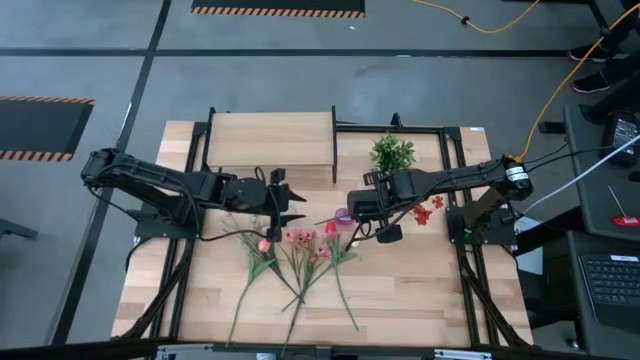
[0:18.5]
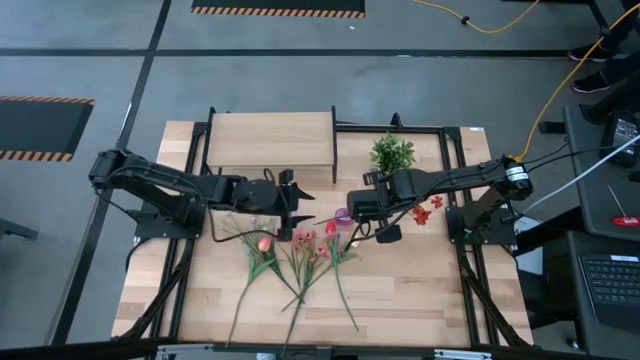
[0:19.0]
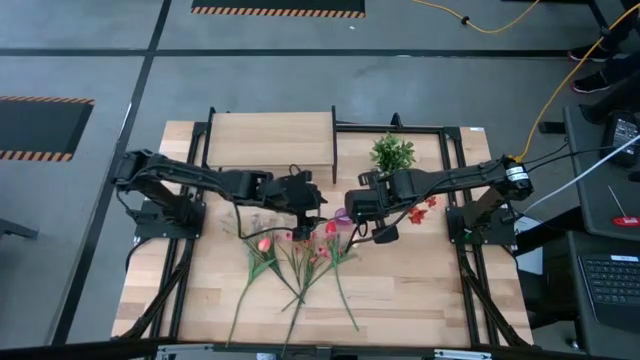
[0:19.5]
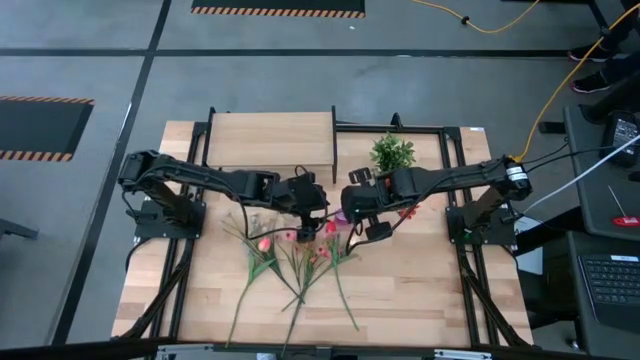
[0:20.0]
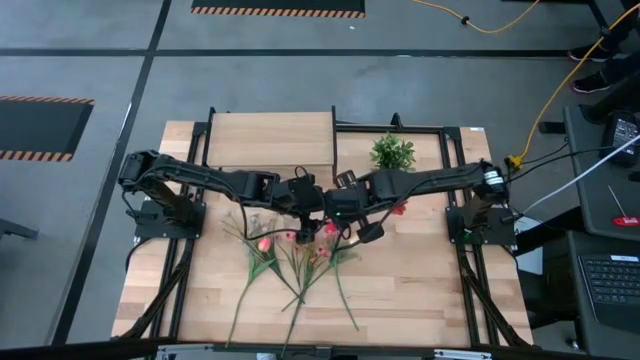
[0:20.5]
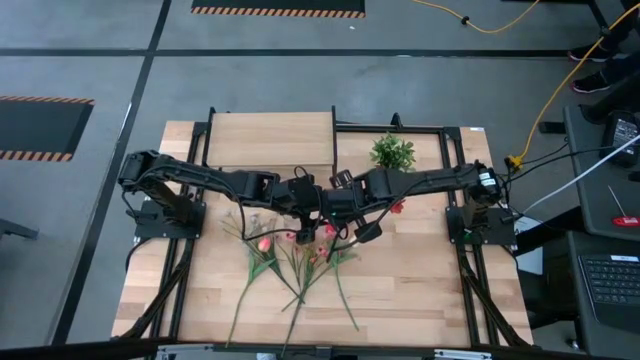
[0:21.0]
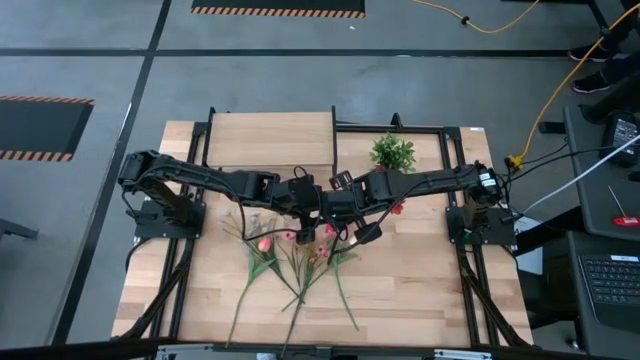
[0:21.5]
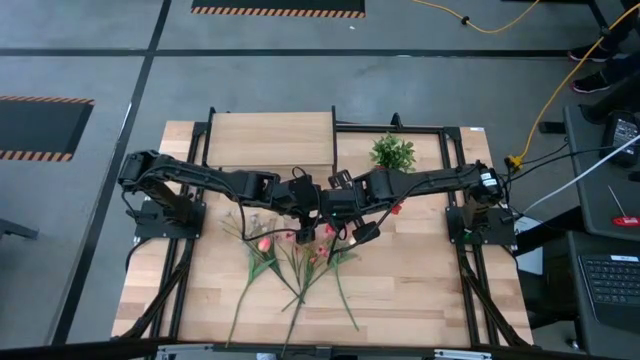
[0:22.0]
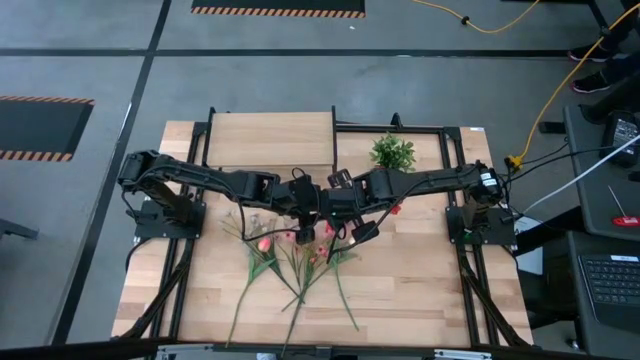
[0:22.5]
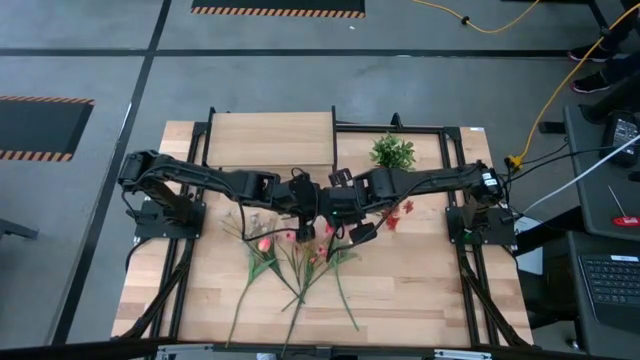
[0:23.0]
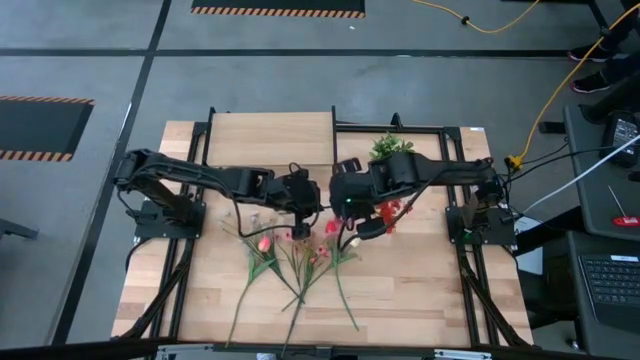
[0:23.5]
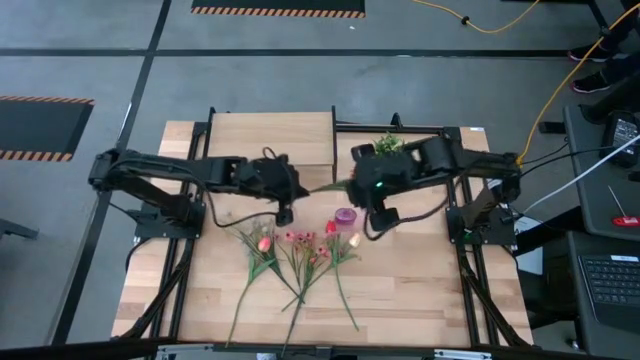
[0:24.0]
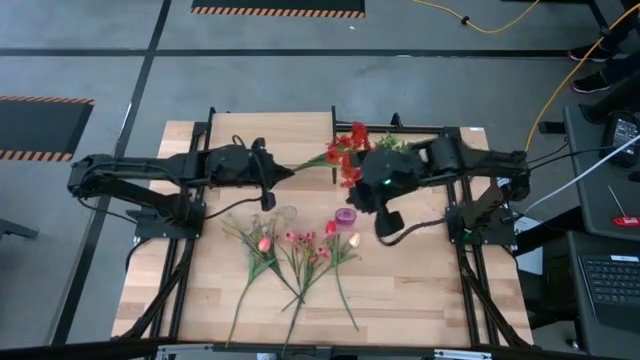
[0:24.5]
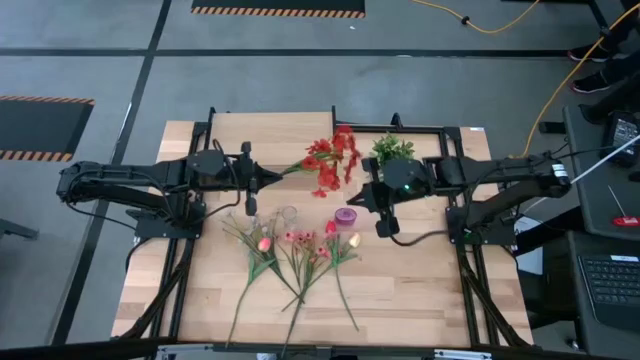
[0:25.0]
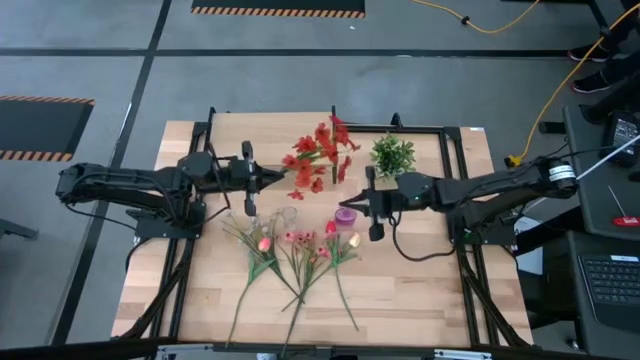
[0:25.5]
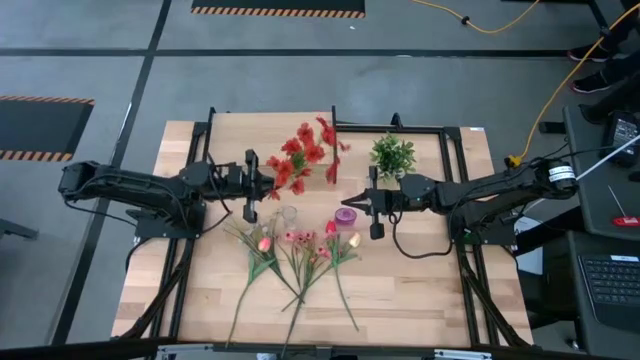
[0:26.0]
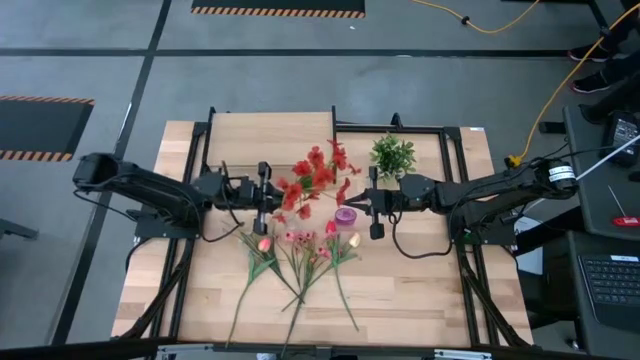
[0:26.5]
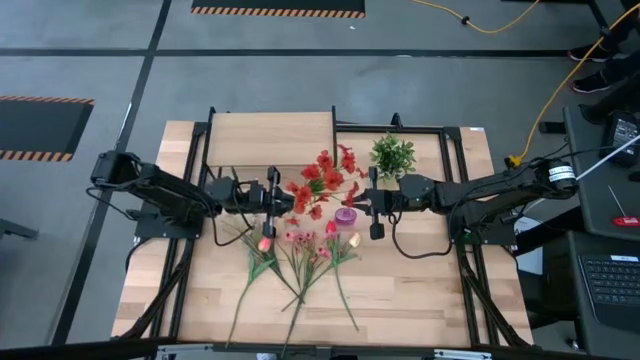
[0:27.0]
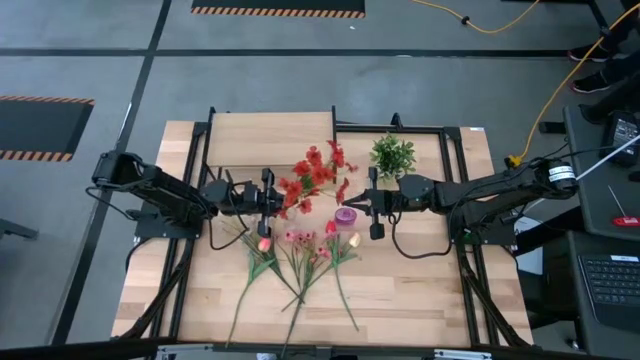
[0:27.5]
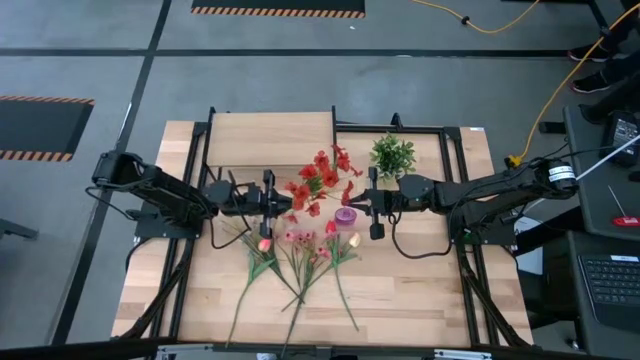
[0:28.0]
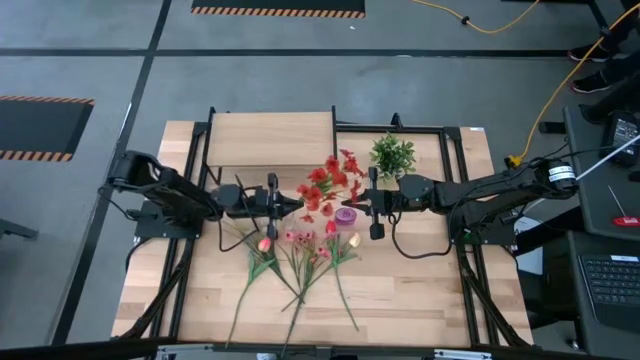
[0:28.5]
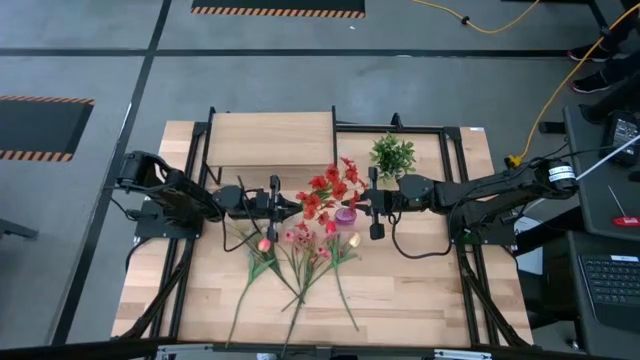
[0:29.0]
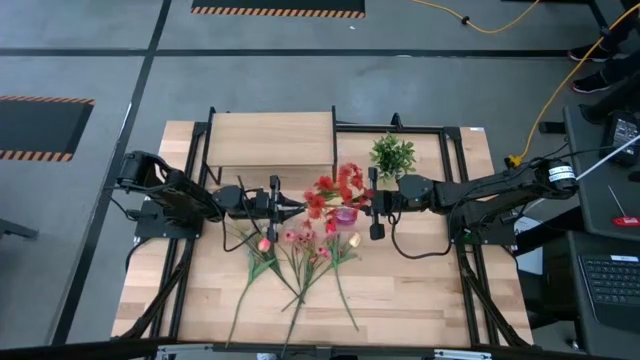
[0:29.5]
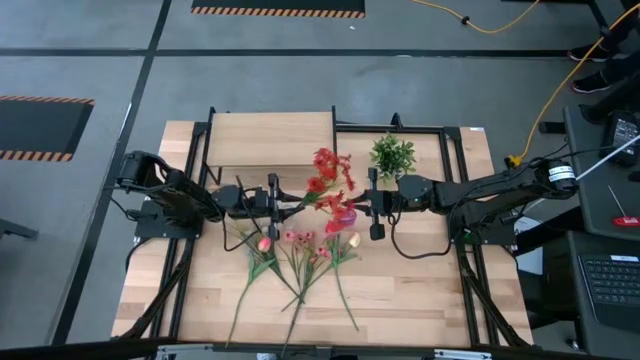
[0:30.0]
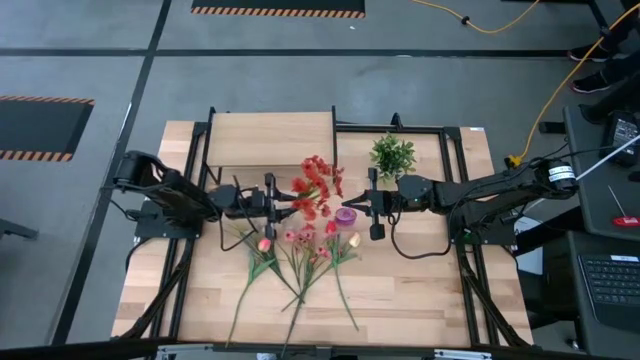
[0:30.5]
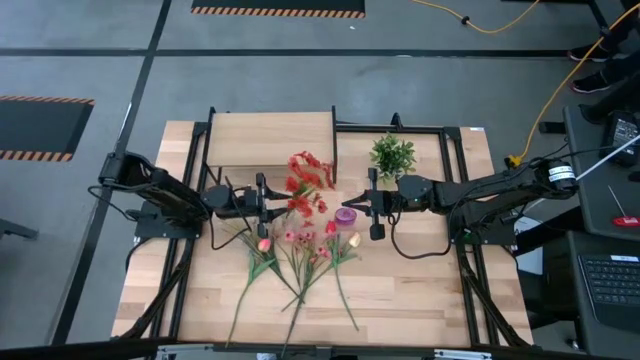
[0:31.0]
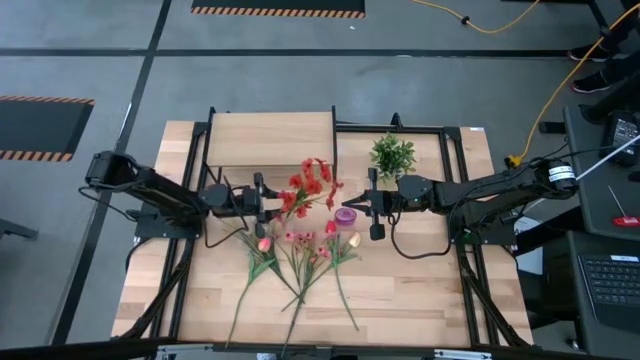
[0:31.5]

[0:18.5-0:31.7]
Task: Pick and place flowers into a vace then onto a shelf
Put the red flowers into the transparent vase

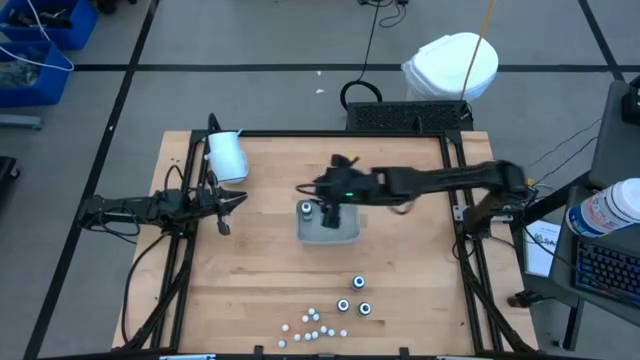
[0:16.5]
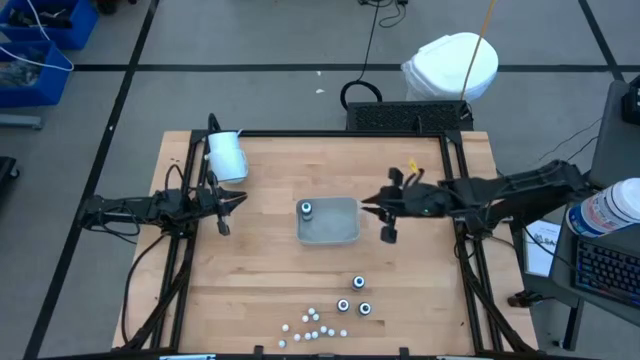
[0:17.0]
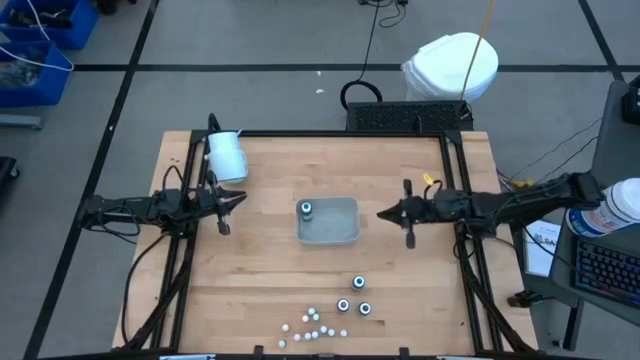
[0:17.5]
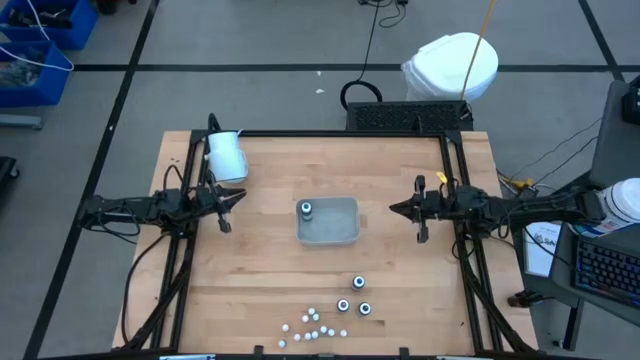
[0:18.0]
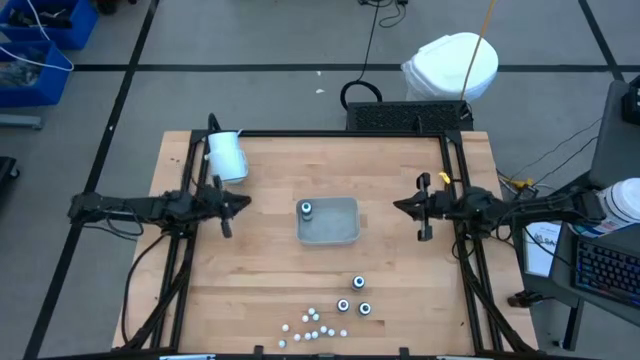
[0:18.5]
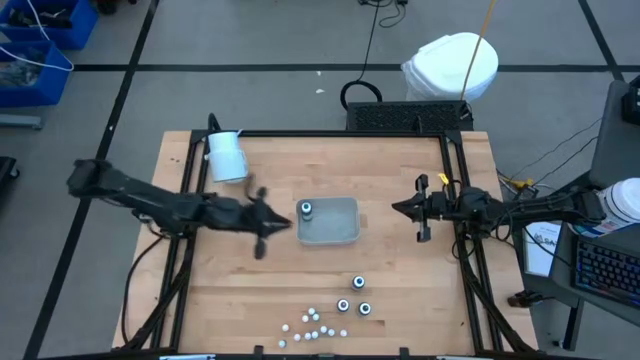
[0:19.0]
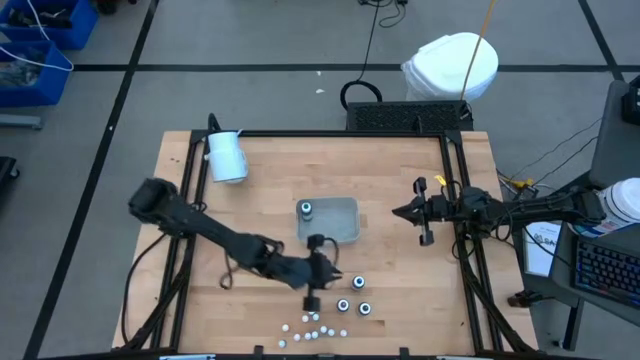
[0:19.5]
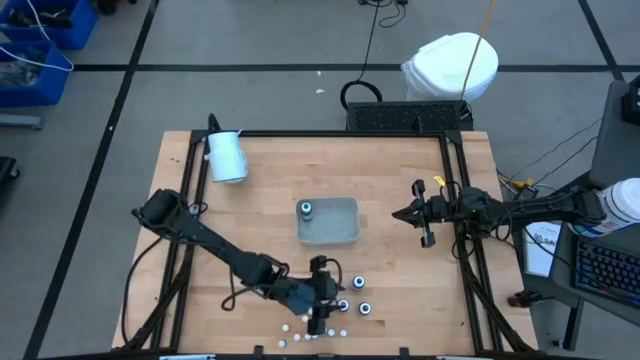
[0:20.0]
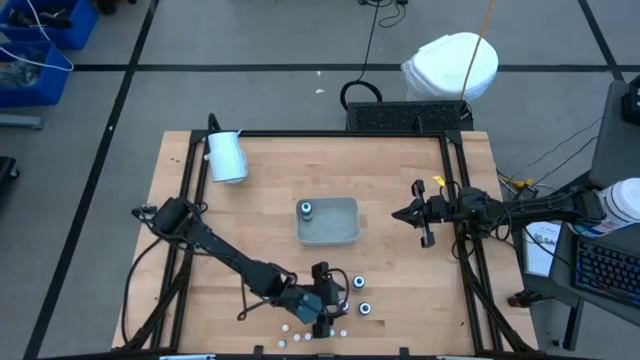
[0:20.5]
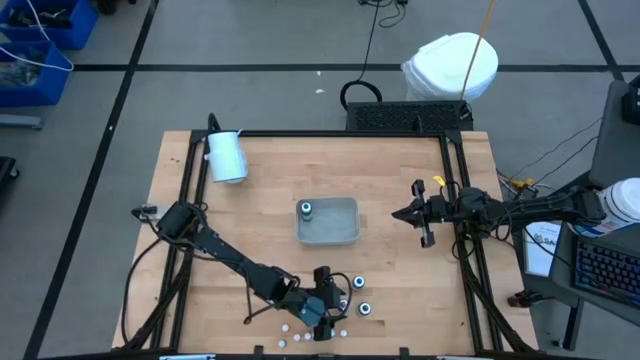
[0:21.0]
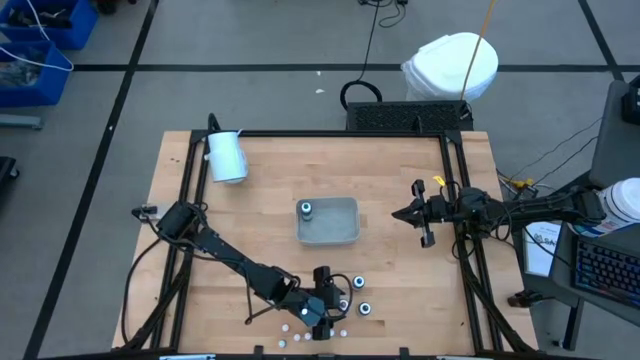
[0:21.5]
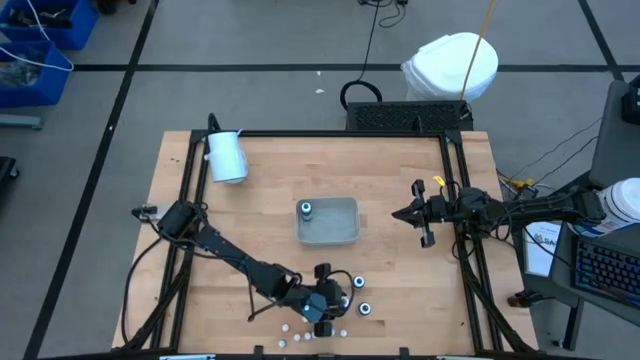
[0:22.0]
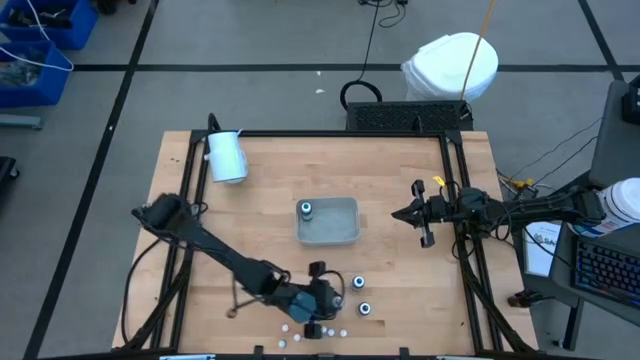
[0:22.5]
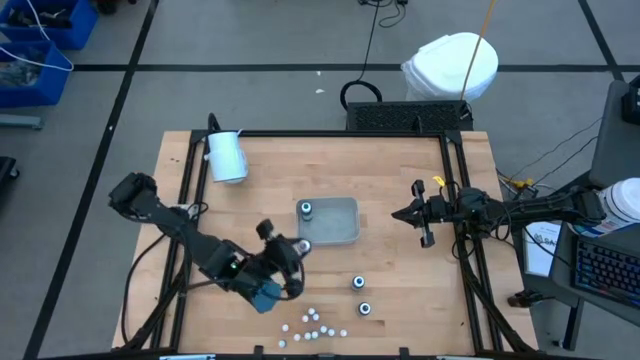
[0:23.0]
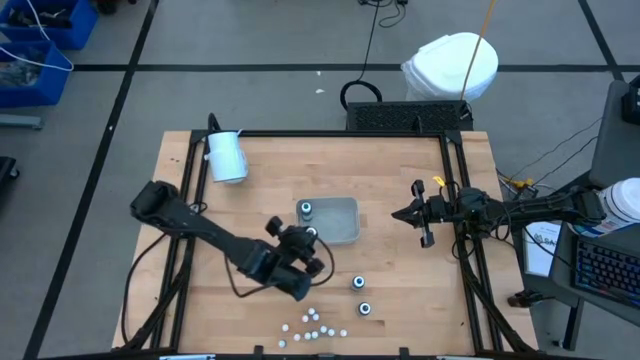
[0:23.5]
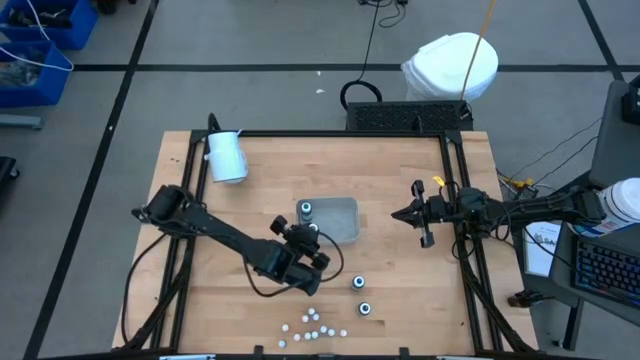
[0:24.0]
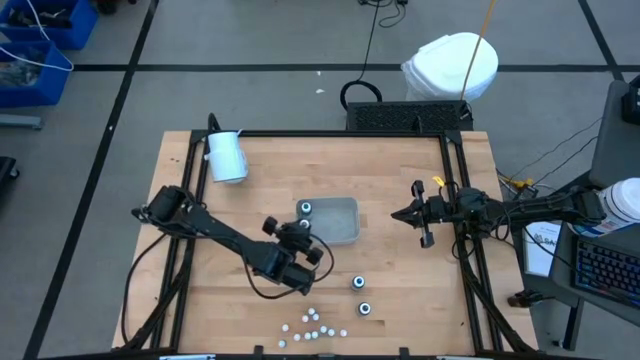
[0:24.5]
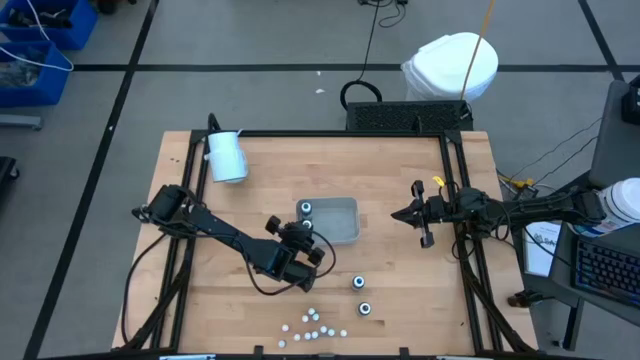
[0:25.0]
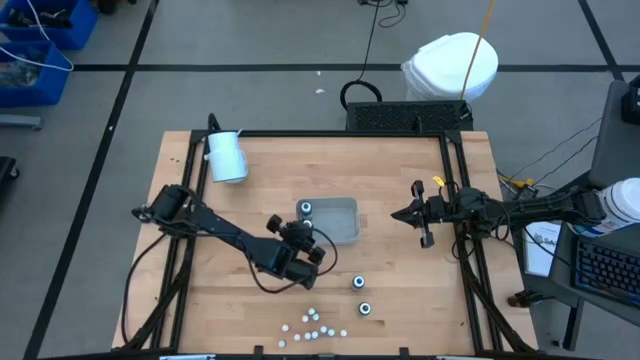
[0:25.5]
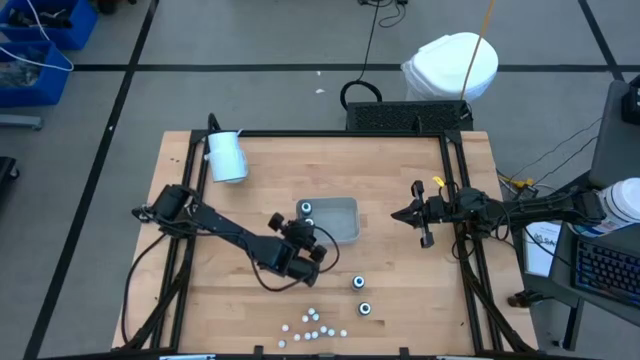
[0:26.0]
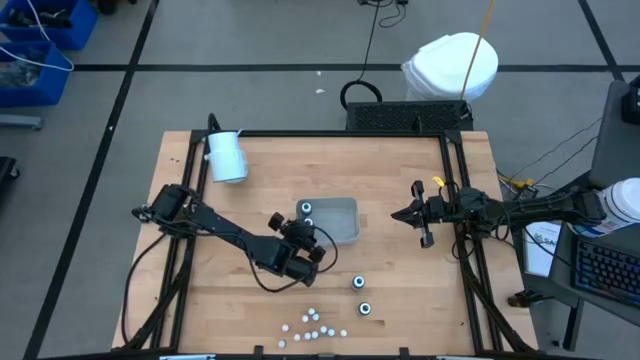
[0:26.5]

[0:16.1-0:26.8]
Task: Pick & Place food coloring
Put the large purple food coloring bottle into the gray bin
